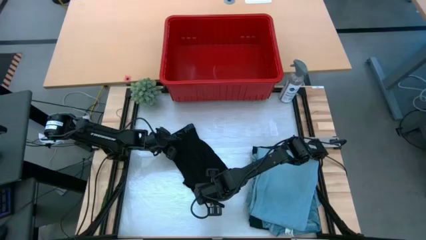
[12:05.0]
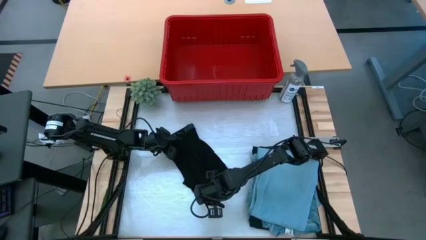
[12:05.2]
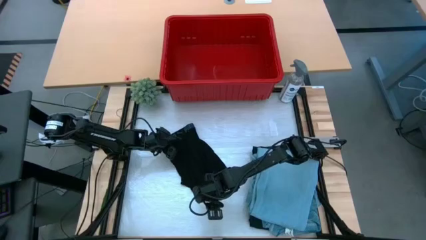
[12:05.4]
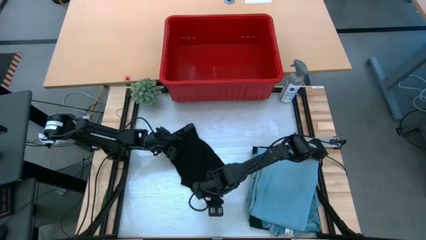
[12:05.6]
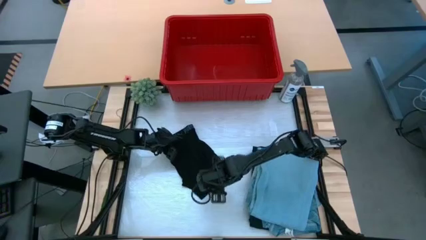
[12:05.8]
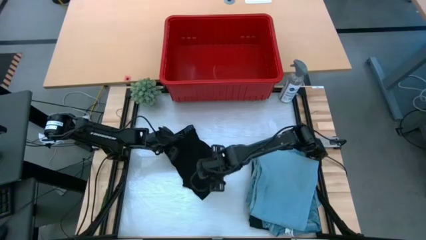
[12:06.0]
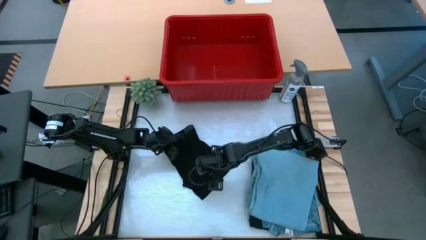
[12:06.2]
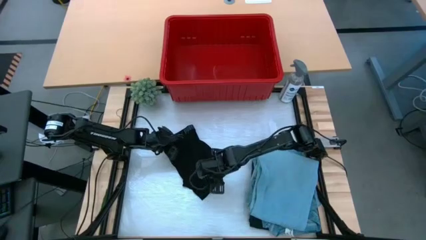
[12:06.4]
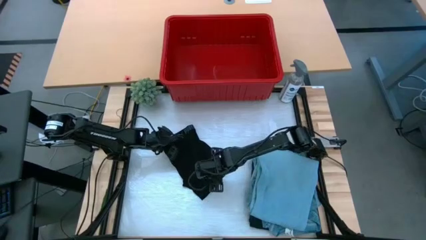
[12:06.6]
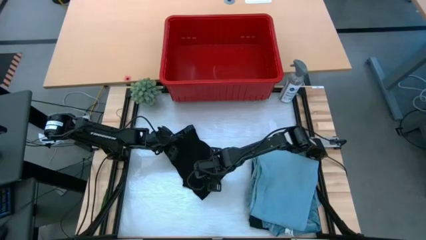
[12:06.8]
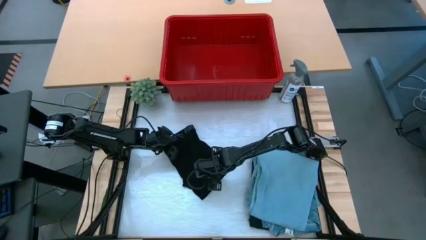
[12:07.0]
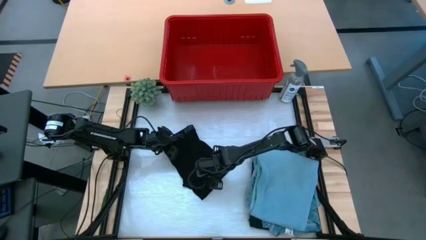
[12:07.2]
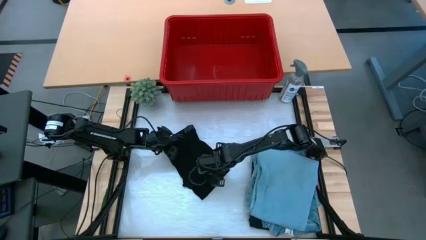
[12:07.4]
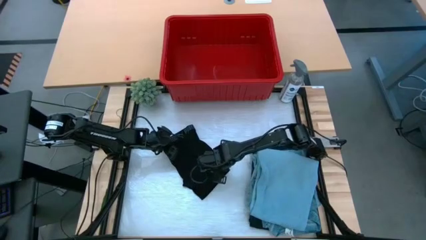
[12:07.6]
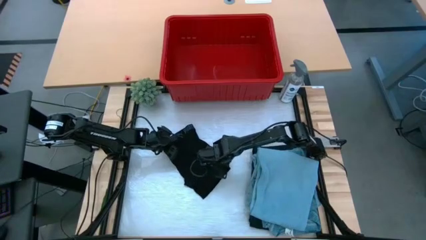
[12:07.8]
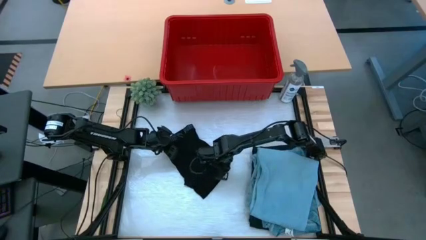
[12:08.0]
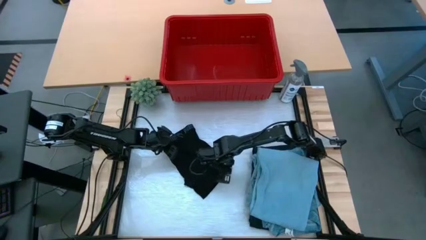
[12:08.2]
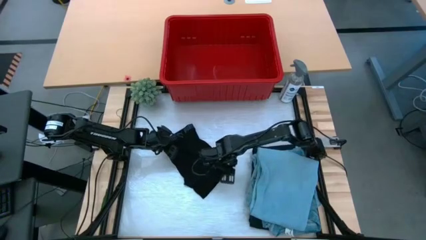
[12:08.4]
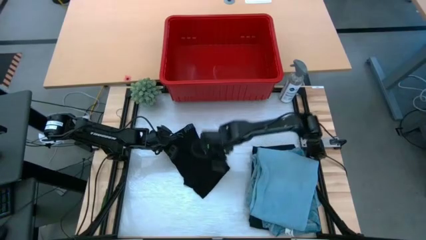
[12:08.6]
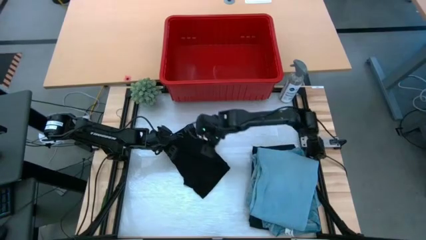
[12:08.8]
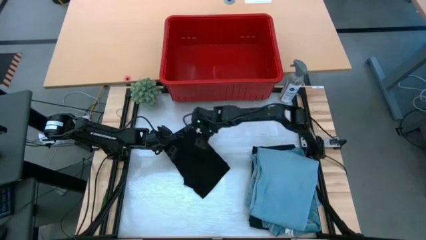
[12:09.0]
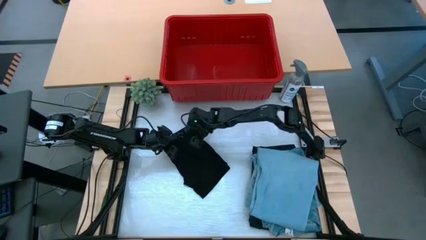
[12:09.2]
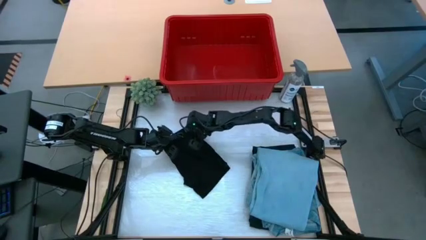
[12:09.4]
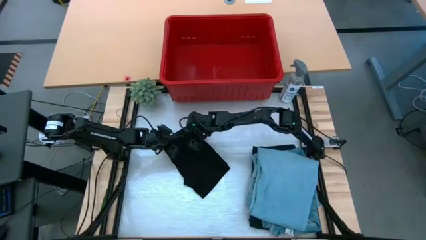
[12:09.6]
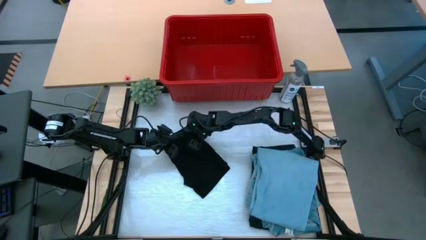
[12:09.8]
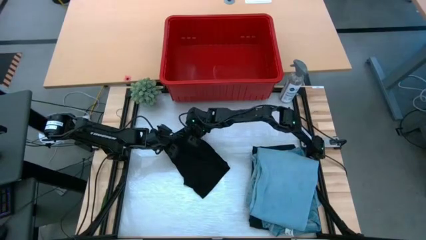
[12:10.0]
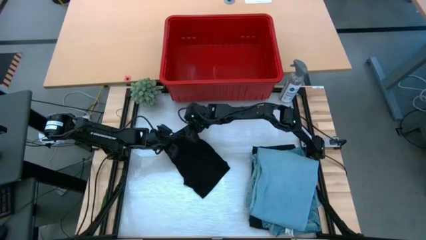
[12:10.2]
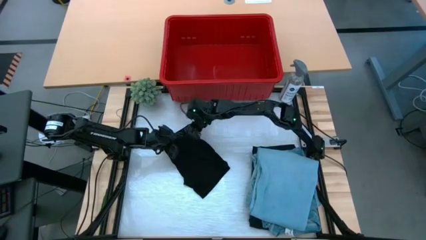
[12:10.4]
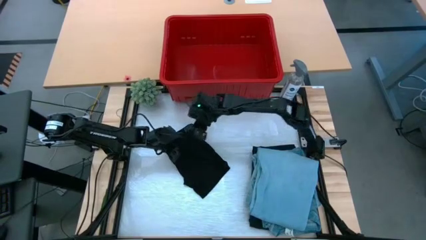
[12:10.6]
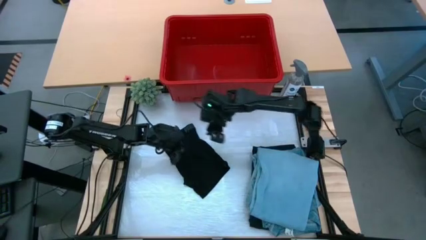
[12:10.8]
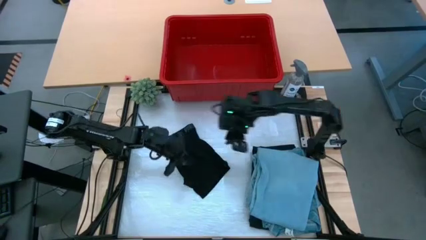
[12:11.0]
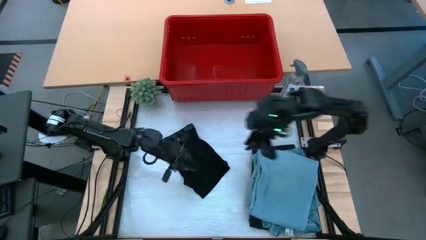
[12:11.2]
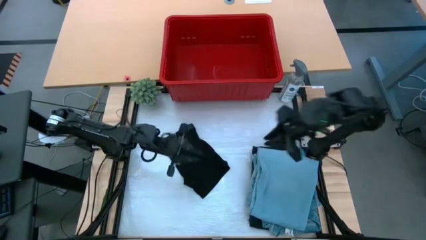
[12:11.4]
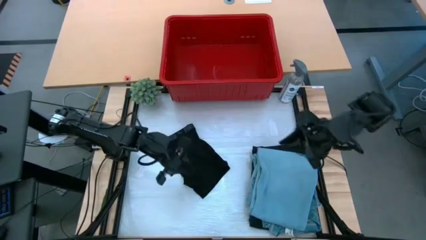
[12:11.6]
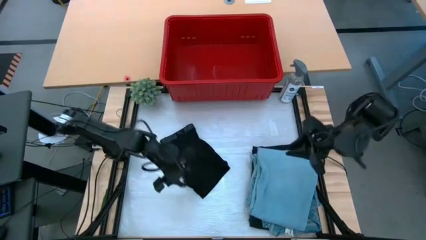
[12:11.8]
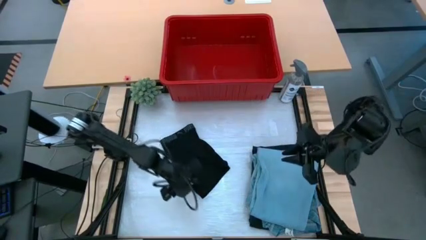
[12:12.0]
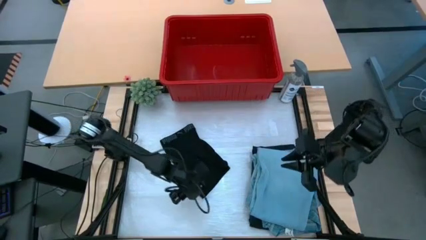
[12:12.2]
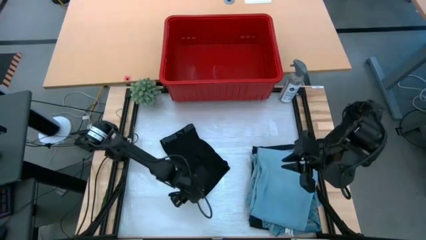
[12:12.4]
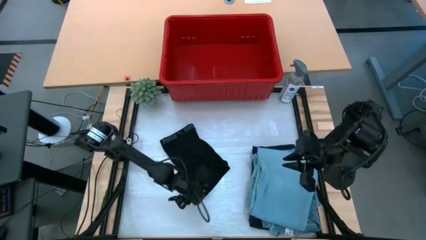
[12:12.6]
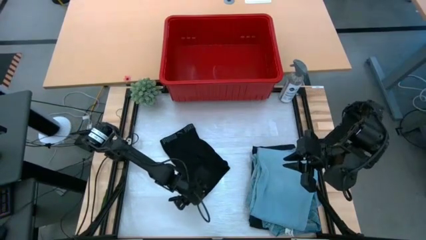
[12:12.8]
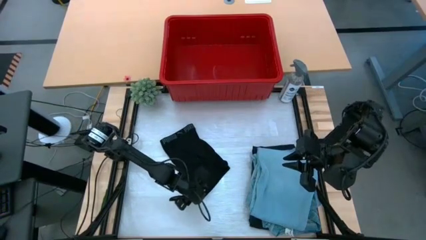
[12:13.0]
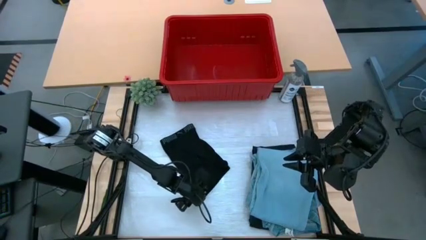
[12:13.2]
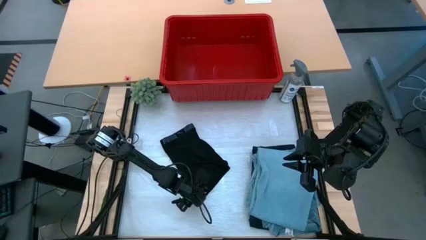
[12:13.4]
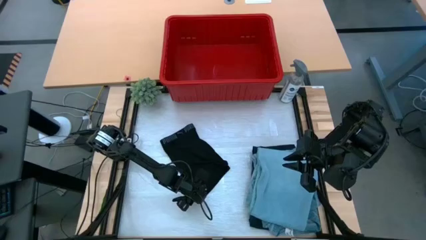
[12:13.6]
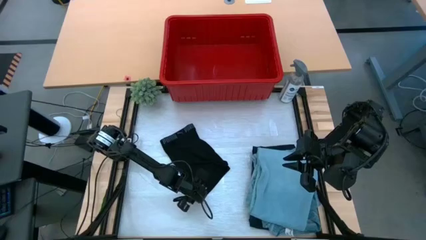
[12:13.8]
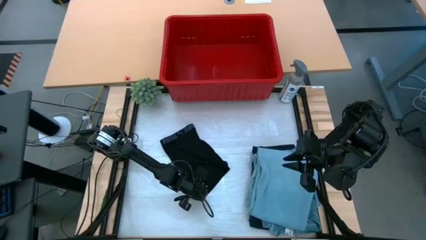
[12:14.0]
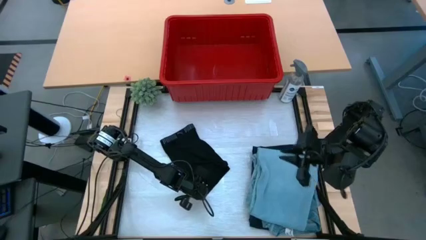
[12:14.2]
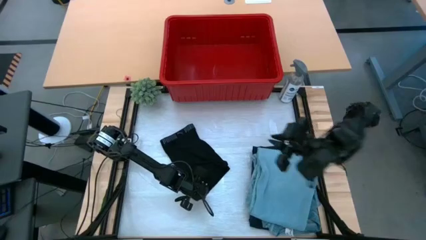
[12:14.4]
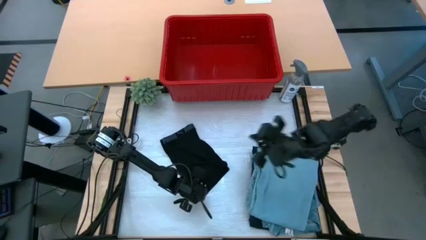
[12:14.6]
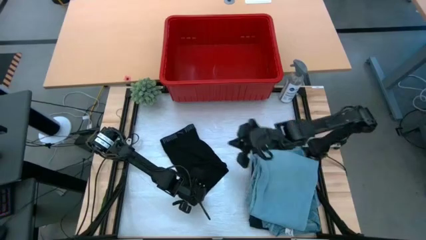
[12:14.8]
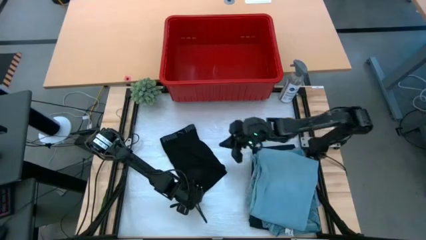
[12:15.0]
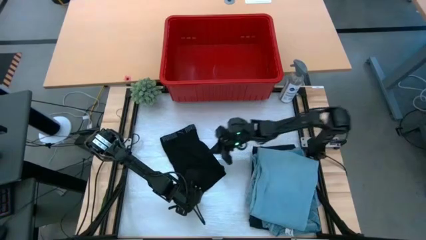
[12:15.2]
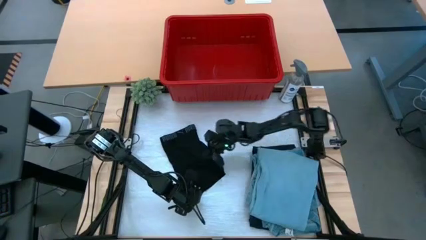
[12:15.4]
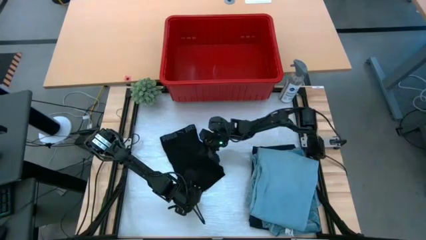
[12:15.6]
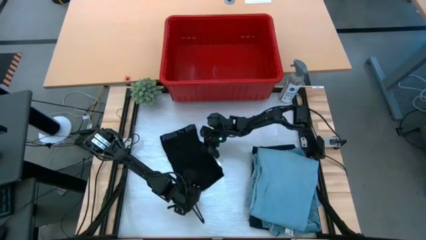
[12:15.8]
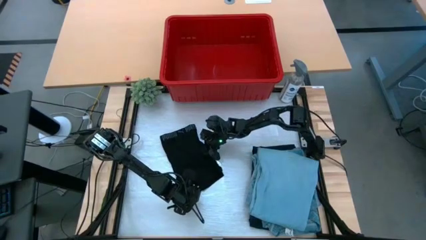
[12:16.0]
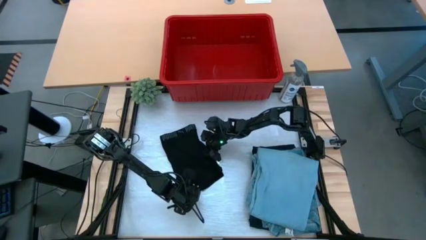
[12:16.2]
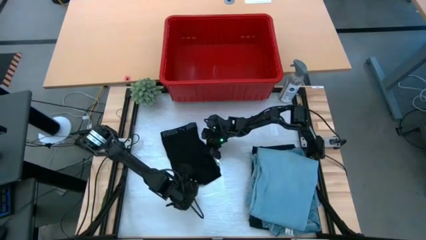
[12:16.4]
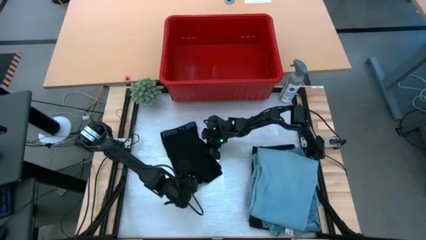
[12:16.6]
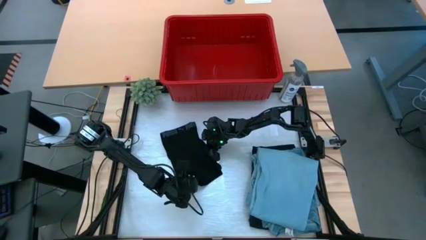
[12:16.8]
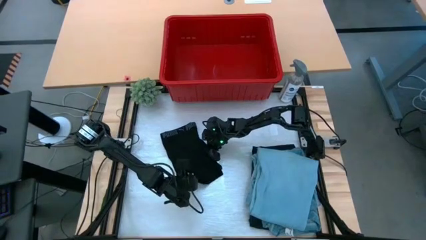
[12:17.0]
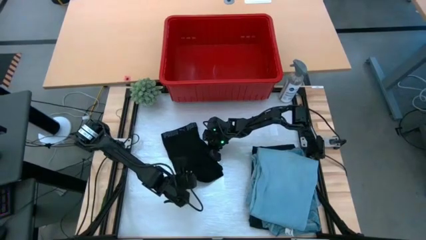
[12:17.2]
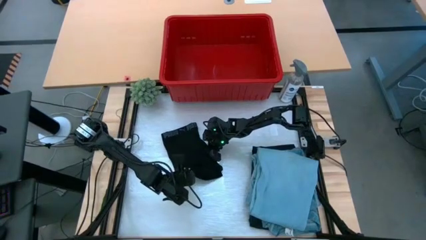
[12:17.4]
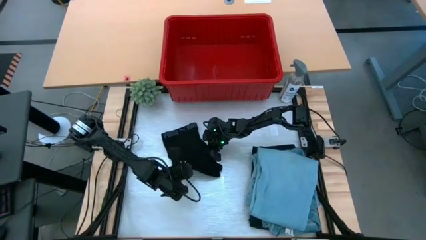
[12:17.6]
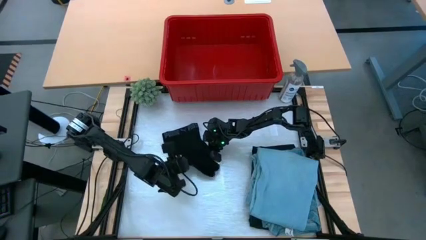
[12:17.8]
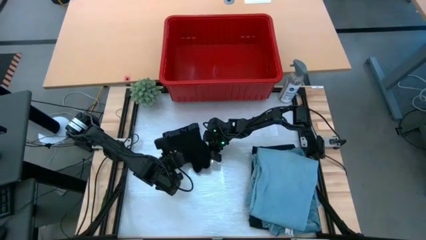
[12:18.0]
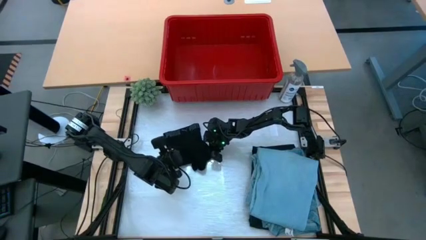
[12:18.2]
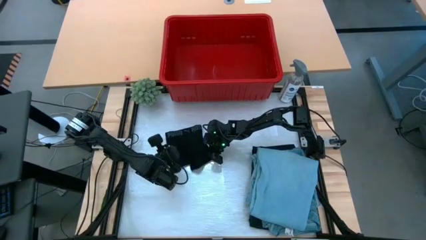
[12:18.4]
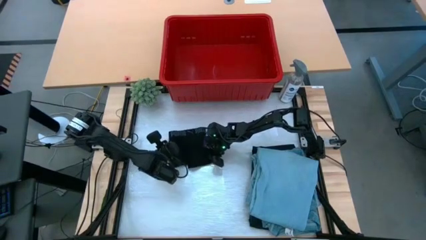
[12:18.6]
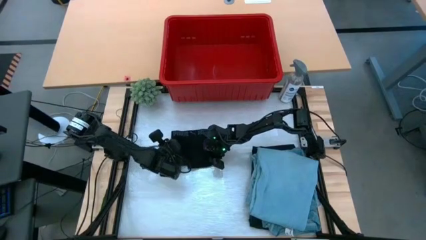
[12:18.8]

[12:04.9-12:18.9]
Task: Fold Laundry from Bin
Fold the black boxer
